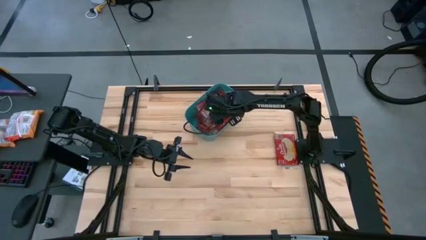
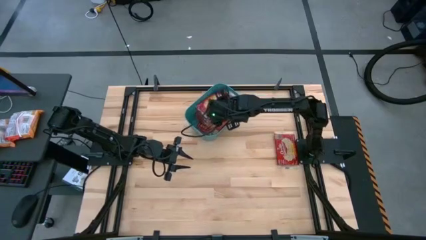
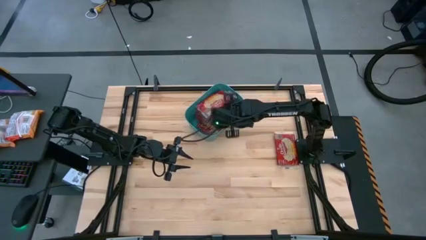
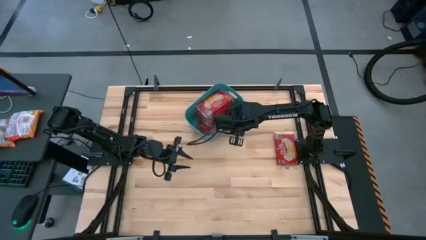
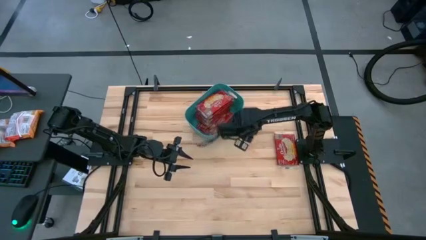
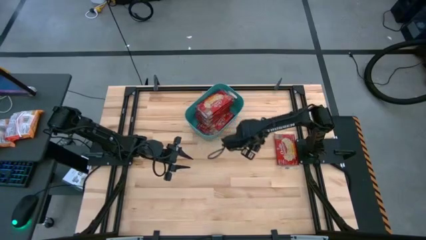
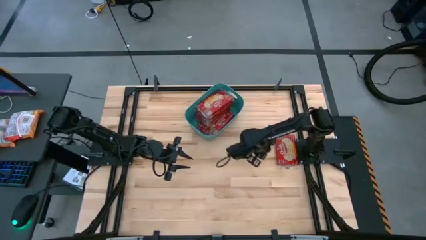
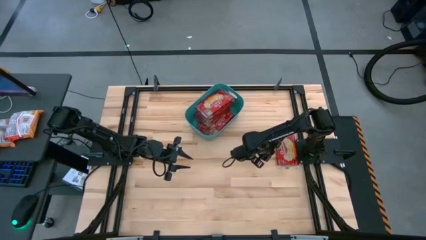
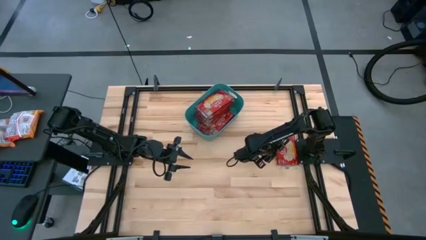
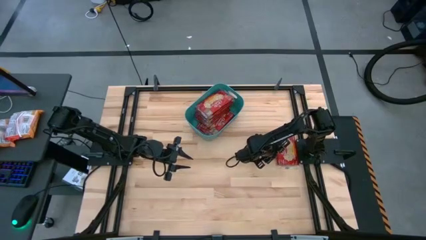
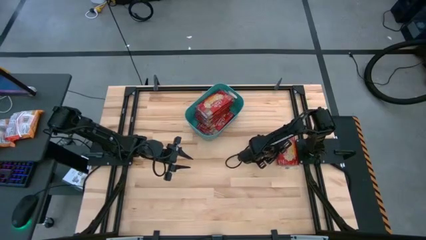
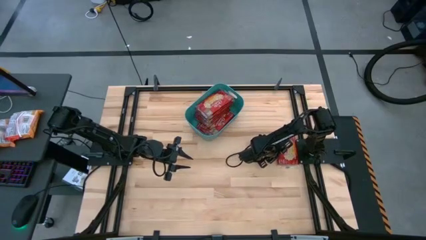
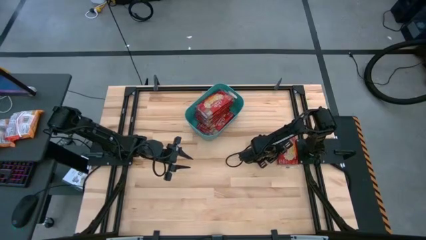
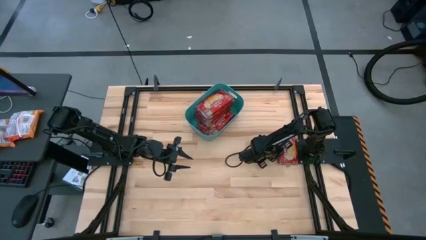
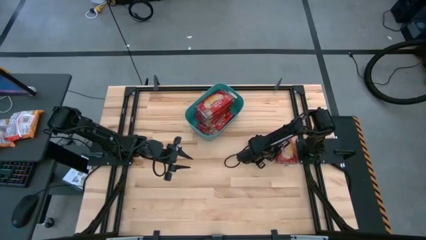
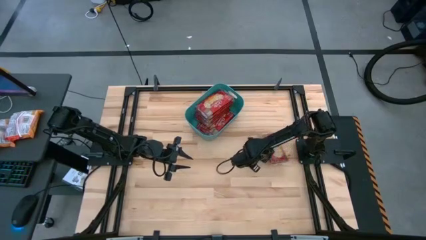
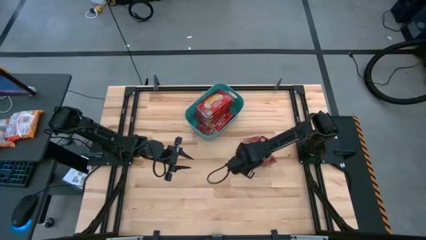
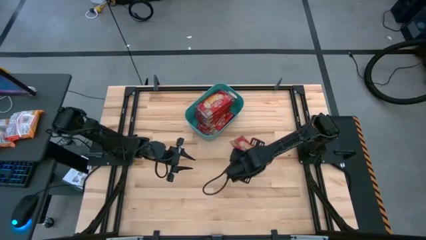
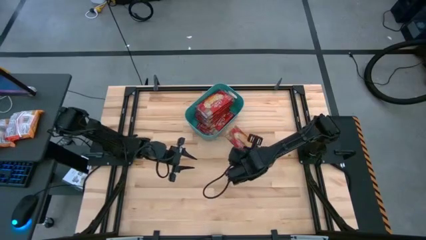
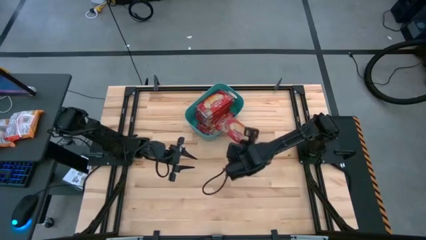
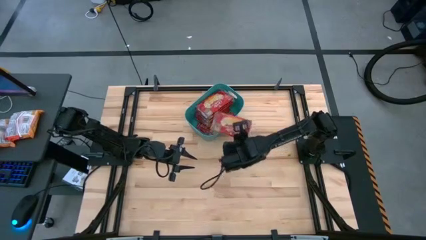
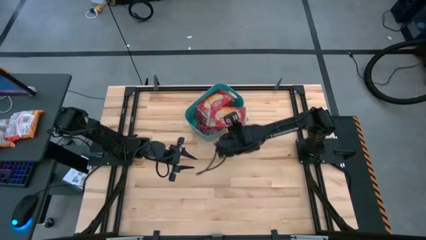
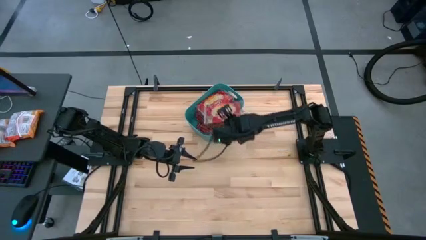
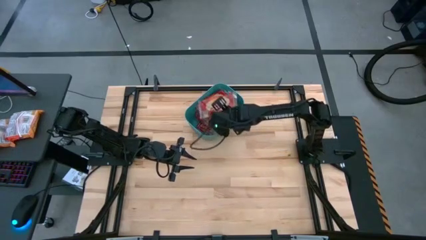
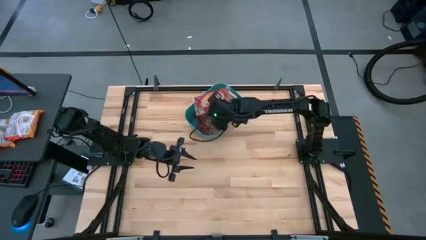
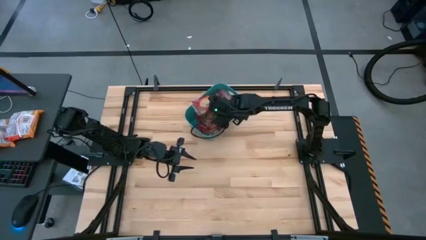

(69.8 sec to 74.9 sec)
Task: Sort popcorn bags into baskets
Put the popcorn pack into the blue bin

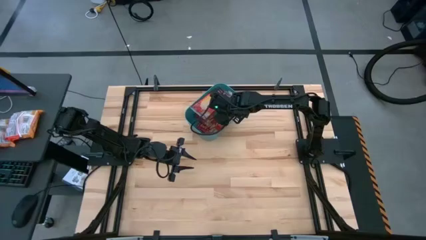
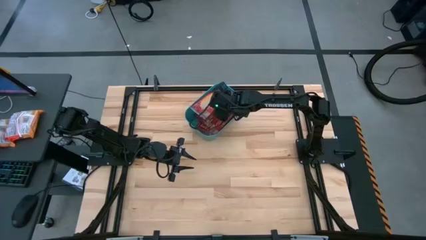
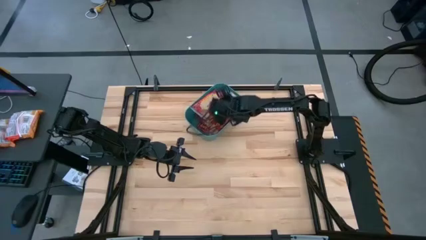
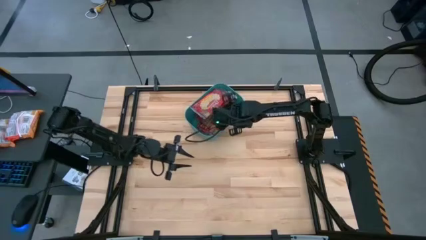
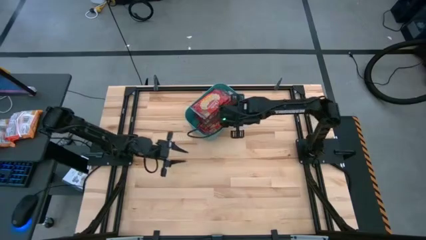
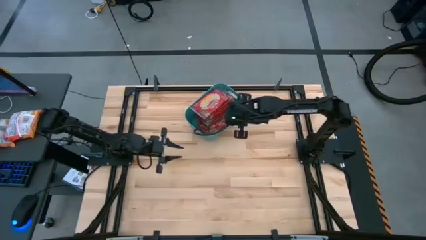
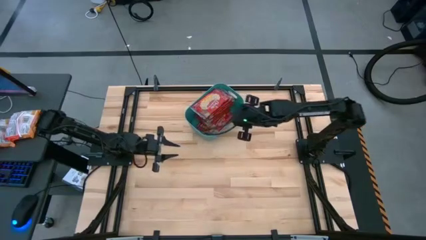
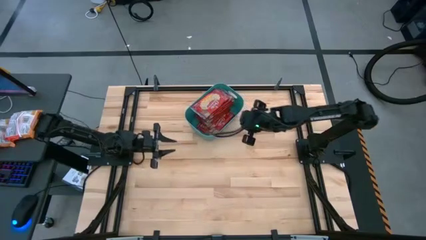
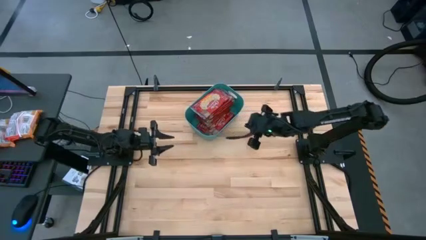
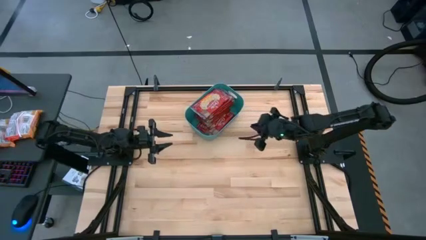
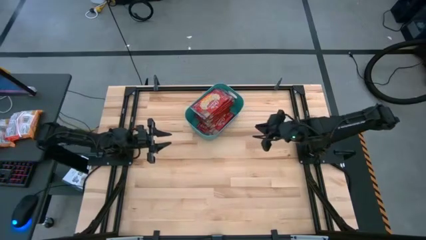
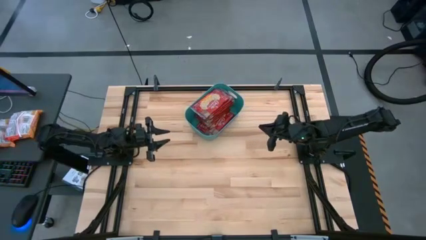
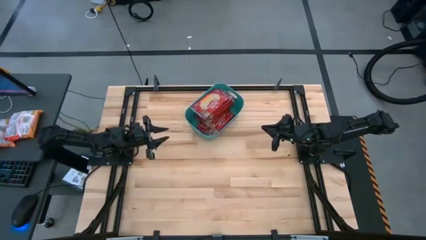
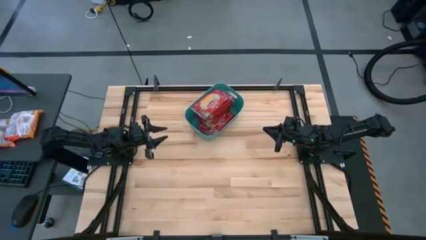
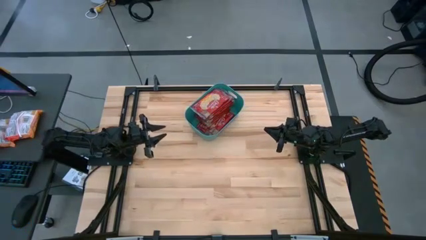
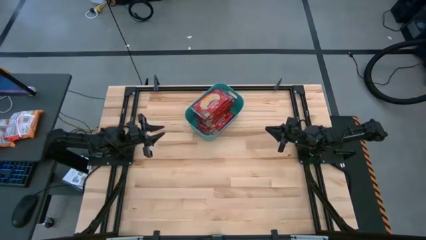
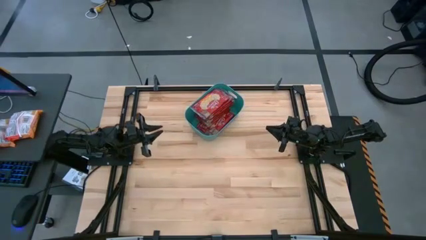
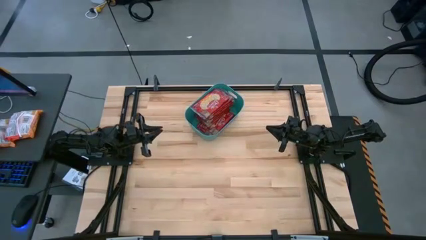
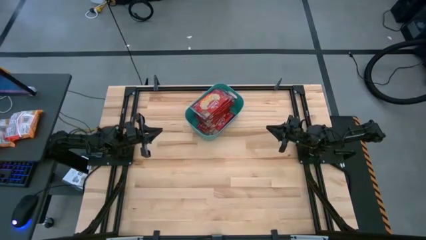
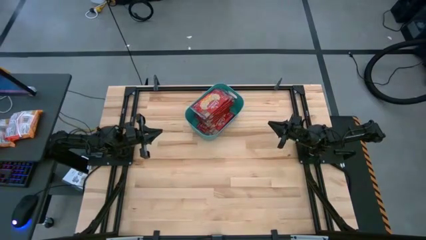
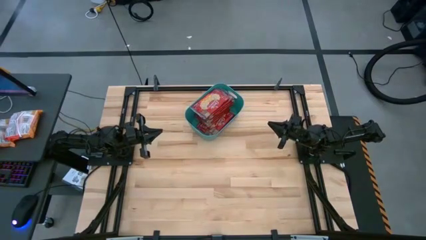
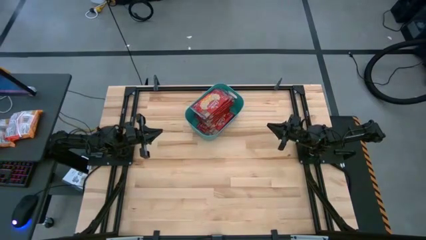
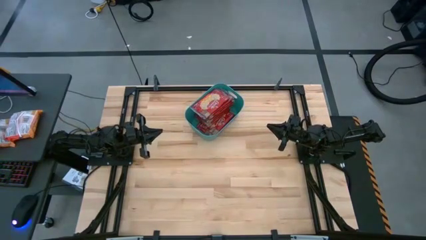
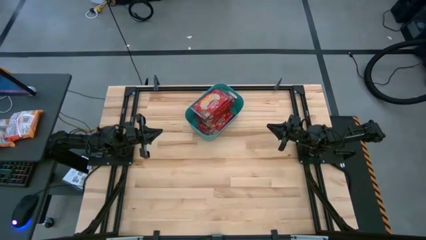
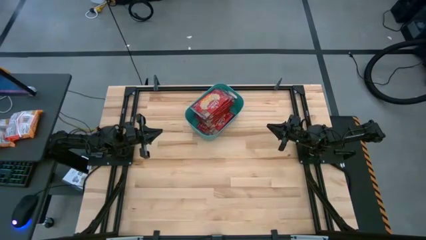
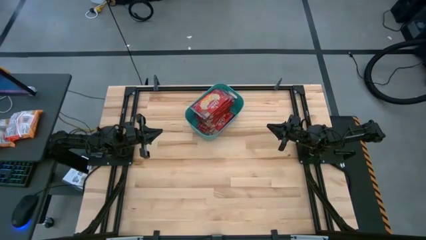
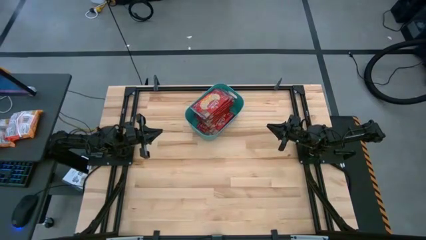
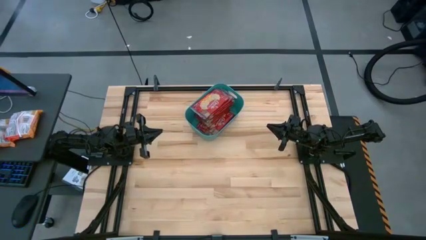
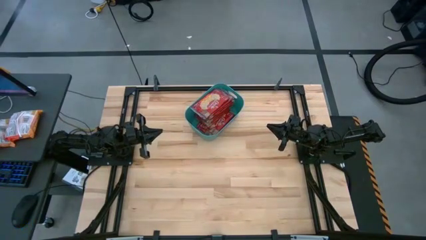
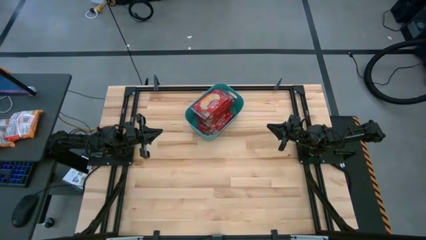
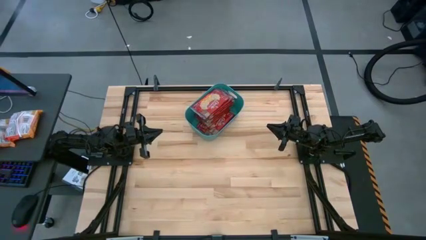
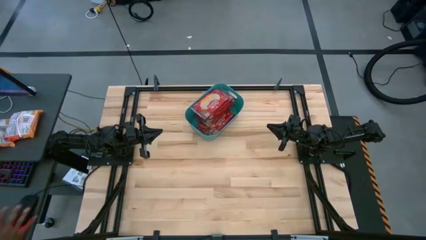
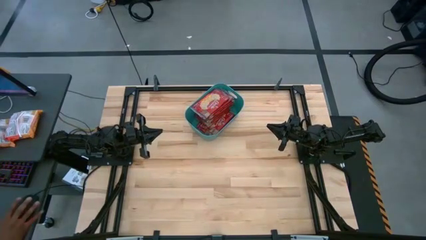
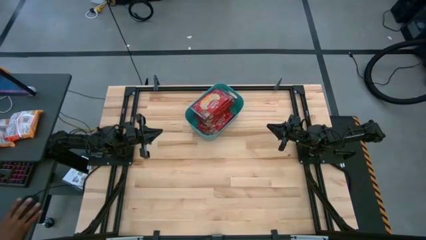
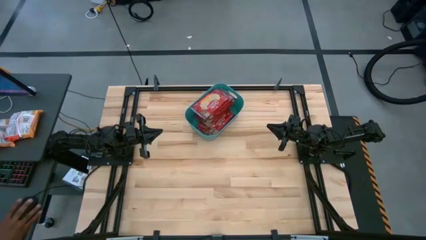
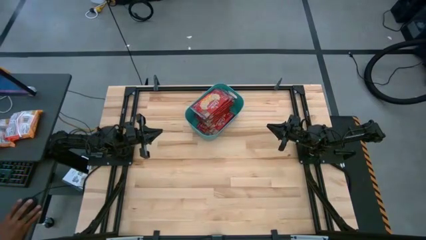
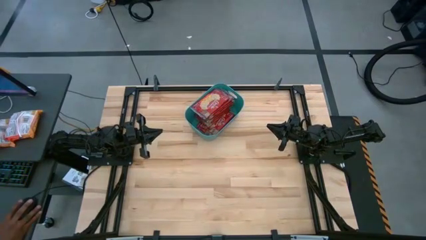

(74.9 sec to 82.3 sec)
Return to Home Position

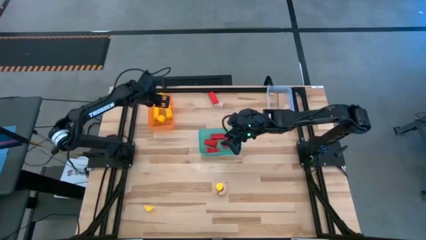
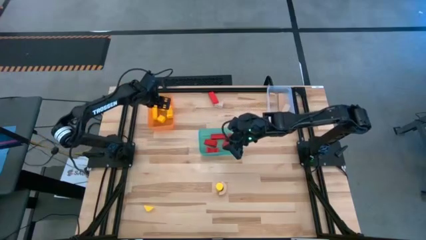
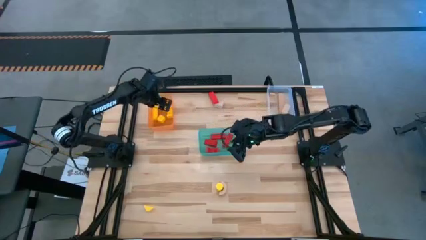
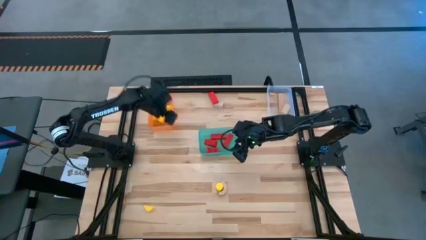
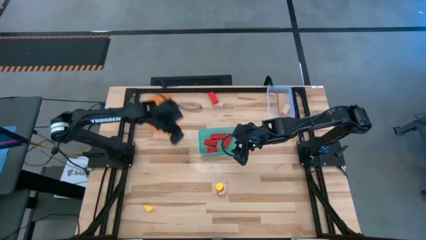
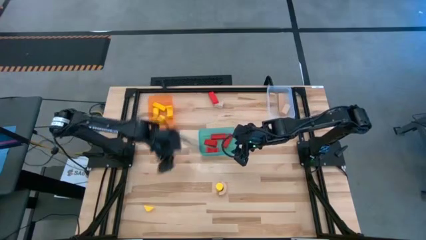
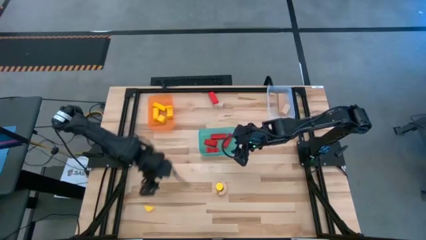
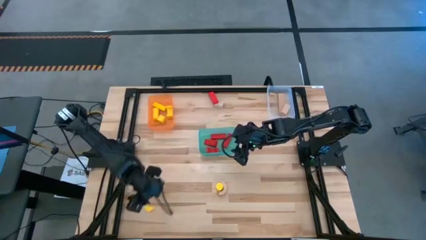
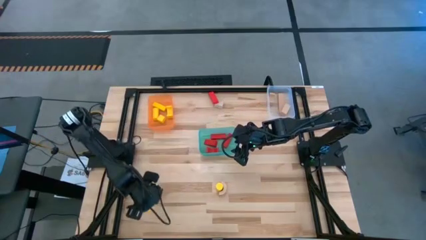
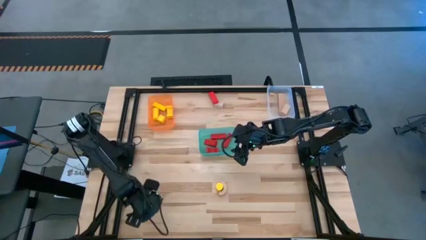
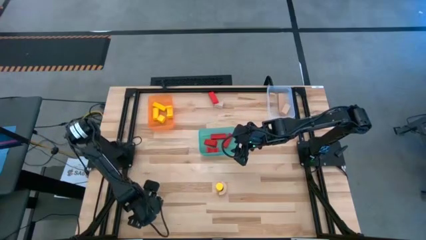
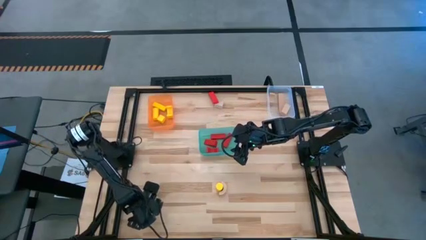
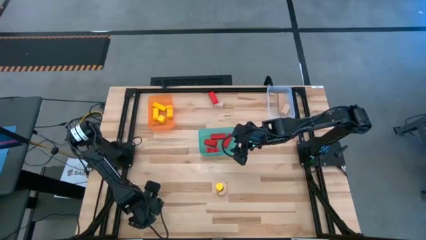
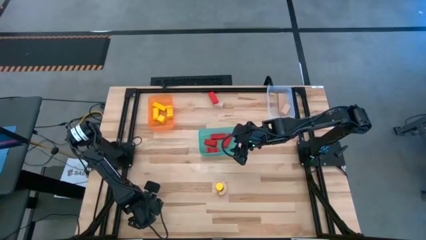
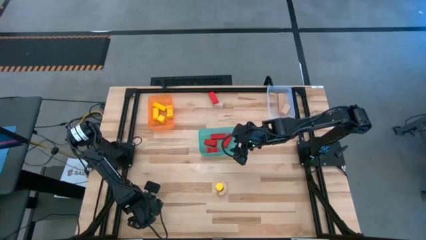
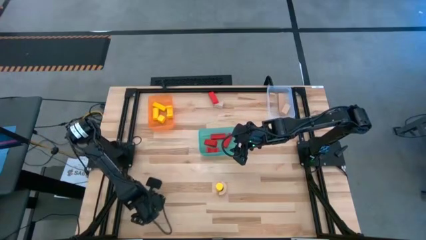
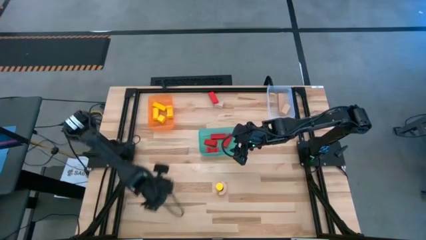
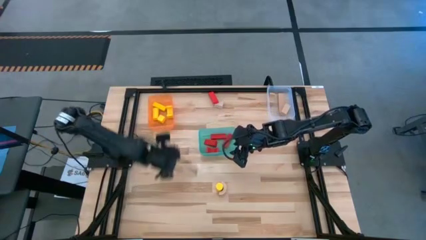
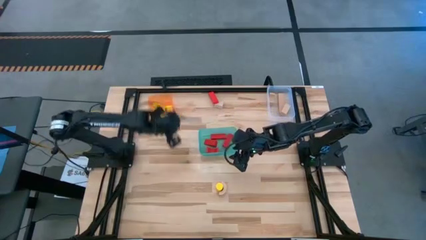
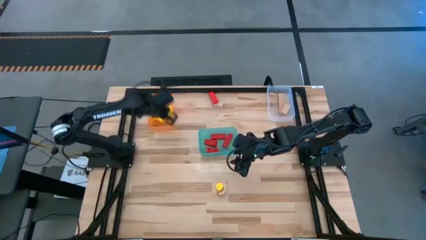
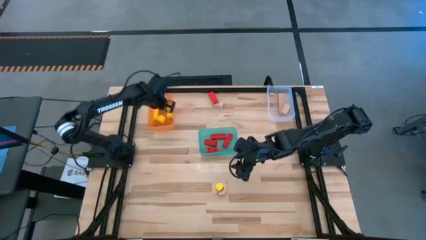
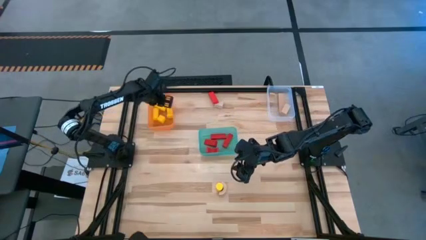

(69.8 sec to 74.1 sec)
Task: Sort & place blocks by color
Put the yellow block into the orange bin
